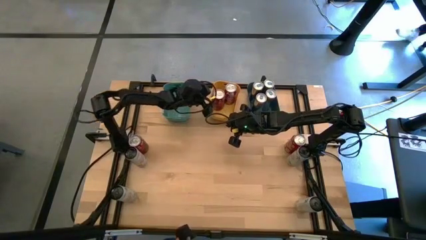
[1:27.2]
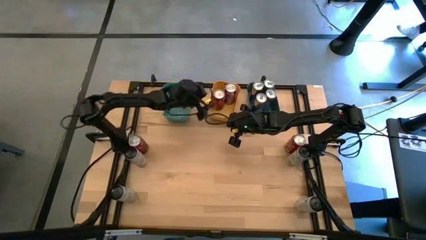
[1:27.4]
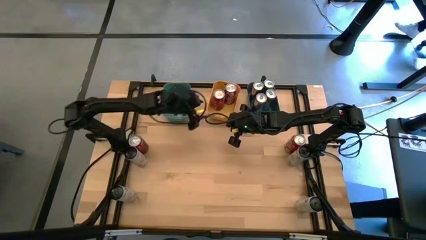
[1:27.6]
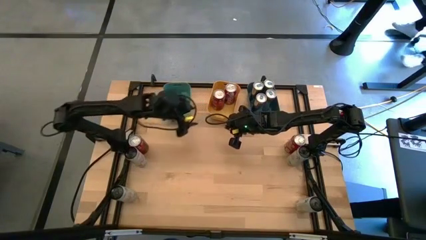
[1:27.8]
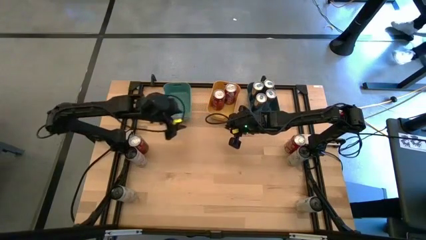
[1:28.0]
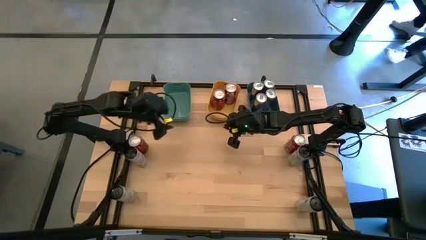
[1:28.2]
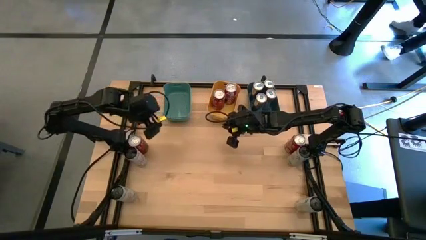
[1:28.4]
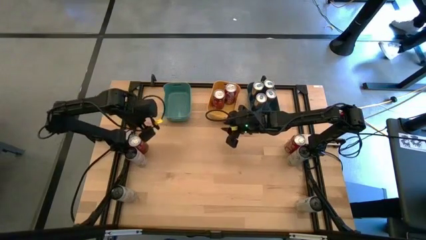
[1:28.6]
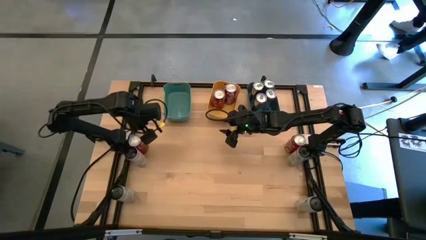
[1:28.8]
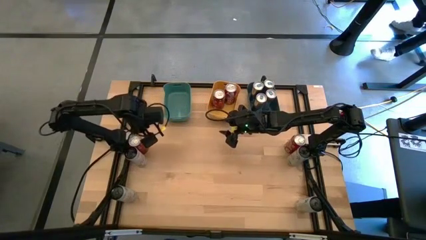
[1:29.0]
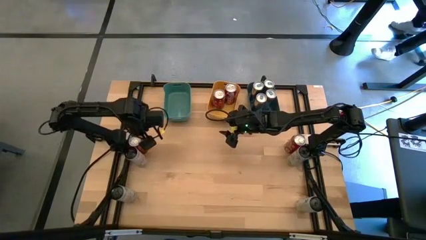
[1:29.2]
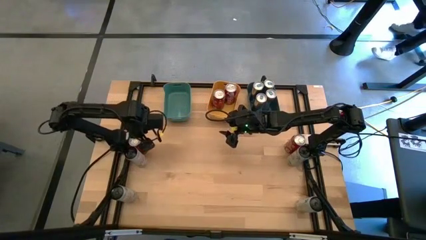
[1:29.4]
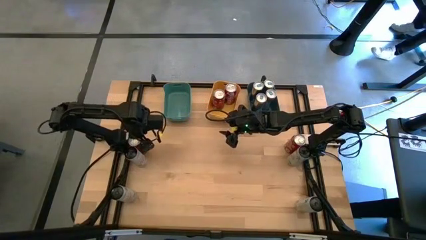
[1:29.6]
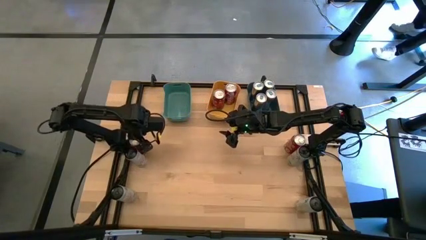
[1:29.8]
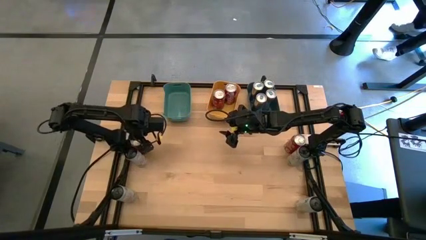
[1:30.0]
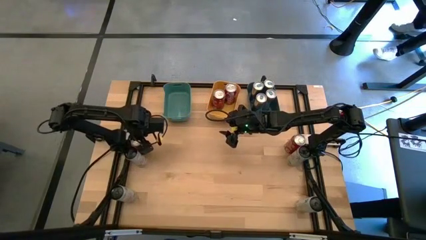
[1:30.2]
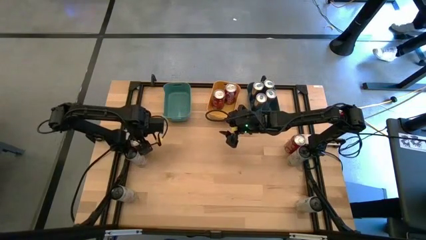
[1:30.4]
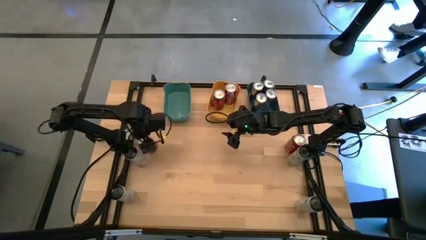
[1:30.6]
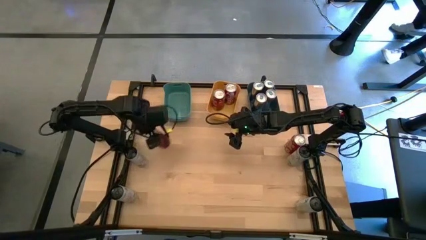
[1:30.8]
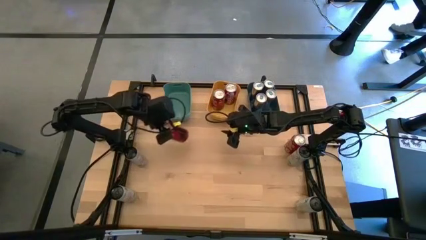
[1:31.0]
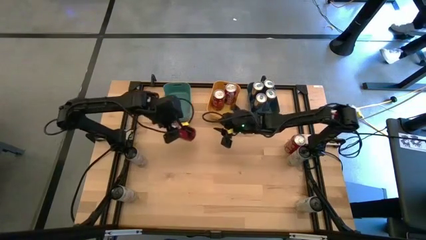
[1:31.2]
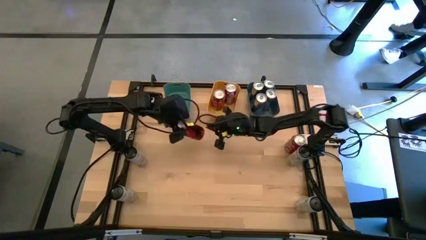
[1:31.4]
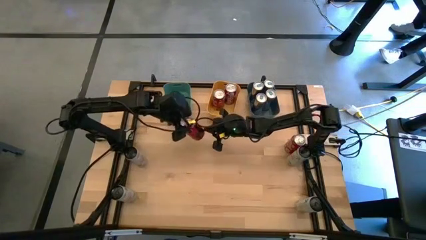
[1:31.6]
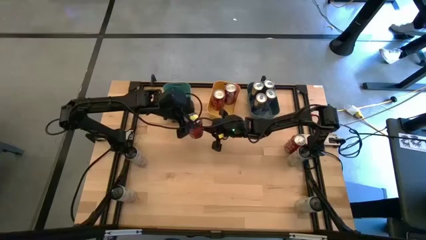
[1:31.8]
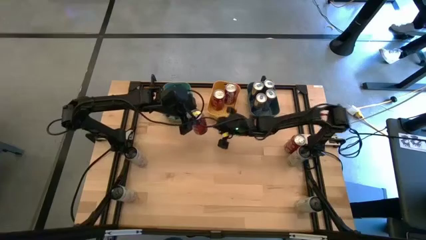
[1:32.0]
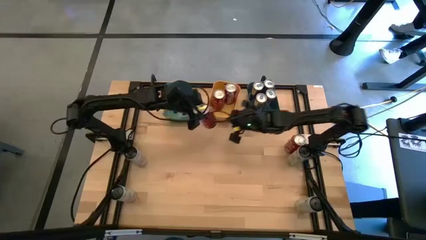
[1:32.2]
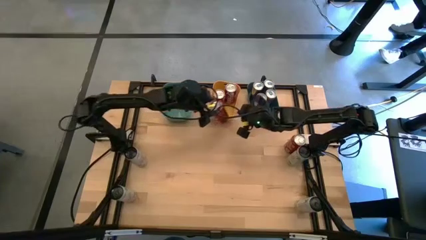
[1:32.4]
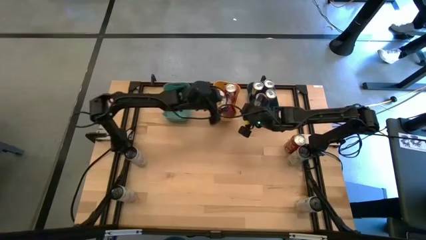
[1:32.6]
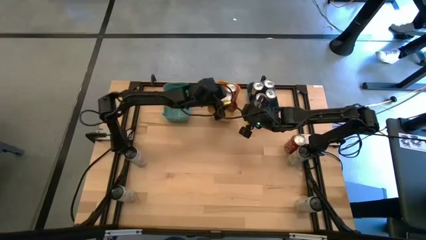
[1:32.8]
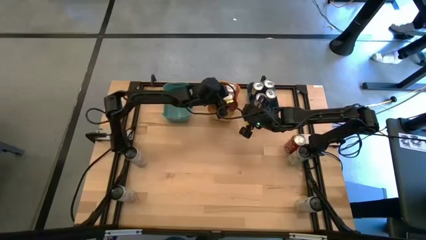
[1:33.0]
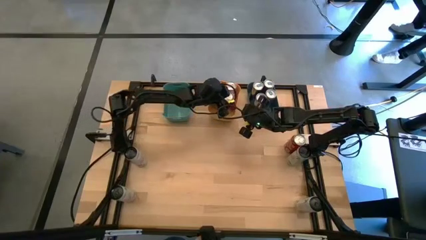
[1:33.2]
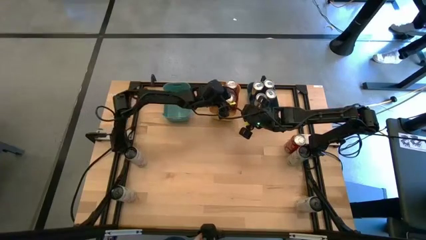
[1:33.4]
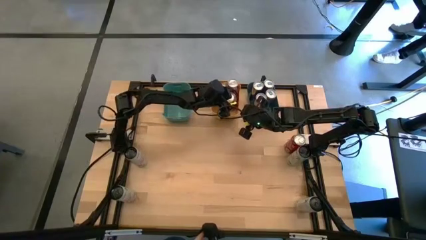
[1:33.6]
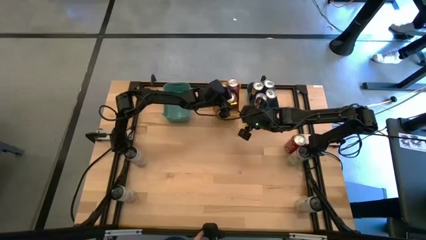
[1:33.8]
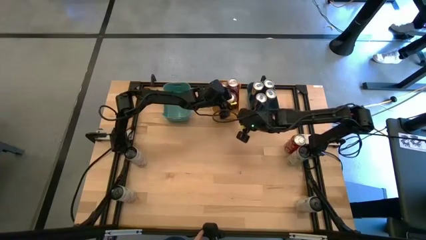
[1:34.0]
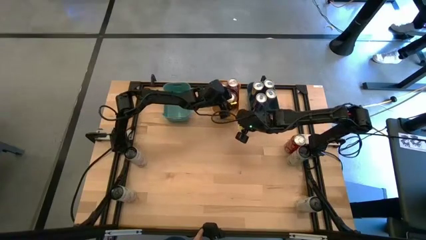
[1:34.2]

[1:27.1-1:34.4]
Task: Sort soda cans
Put the left red soda can into the yellow bin

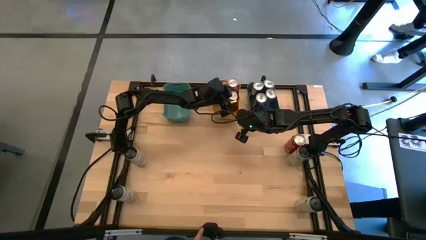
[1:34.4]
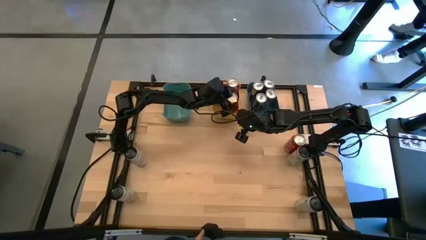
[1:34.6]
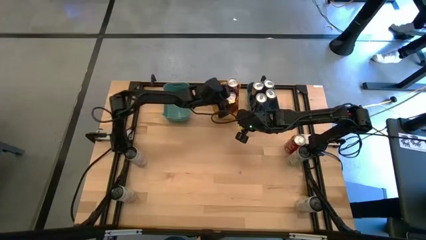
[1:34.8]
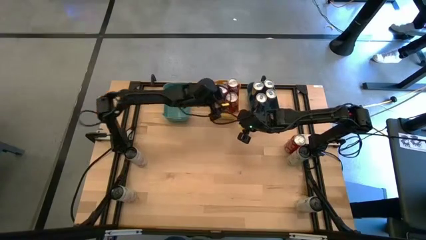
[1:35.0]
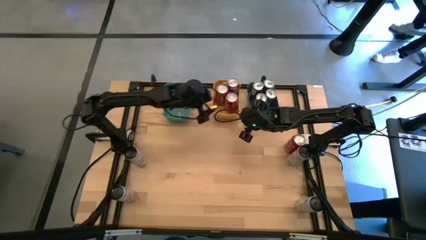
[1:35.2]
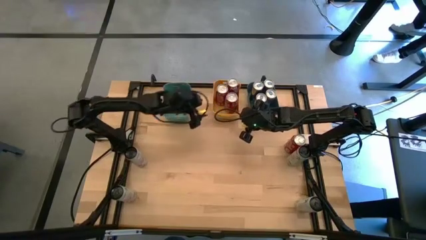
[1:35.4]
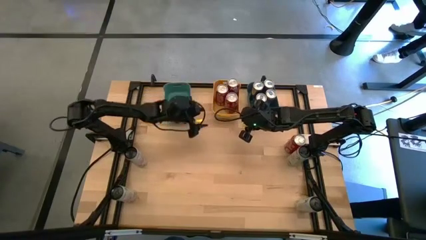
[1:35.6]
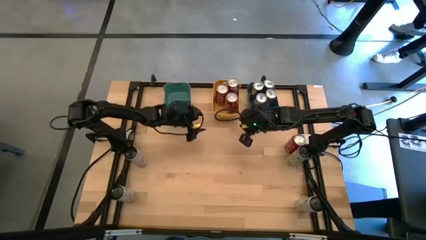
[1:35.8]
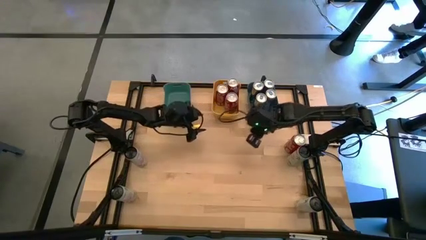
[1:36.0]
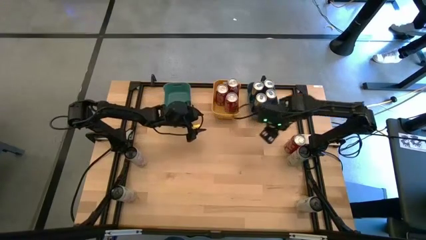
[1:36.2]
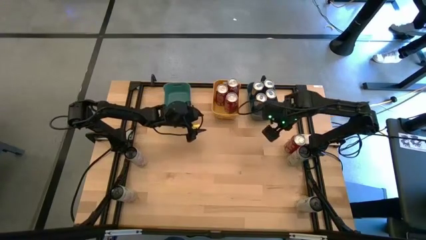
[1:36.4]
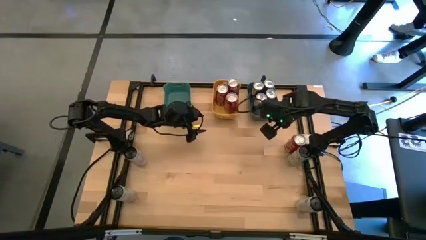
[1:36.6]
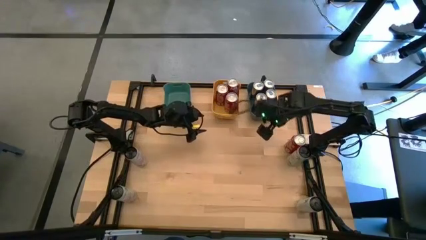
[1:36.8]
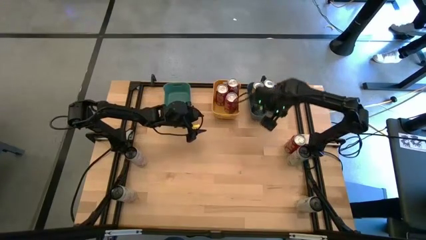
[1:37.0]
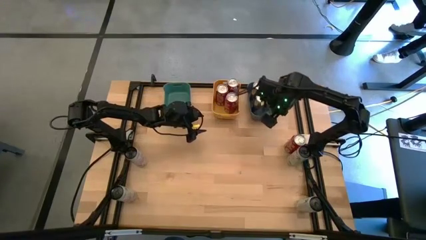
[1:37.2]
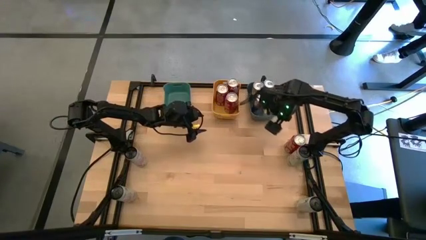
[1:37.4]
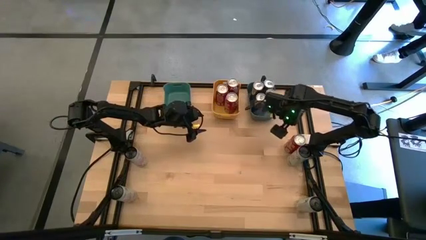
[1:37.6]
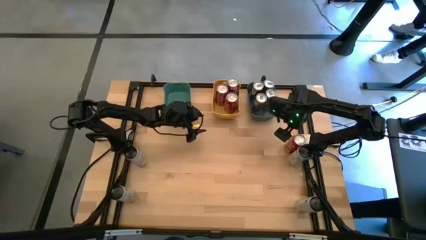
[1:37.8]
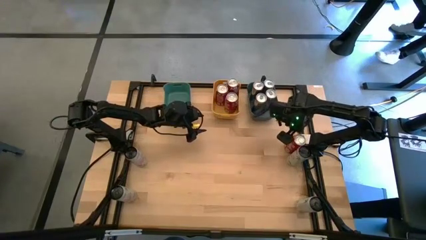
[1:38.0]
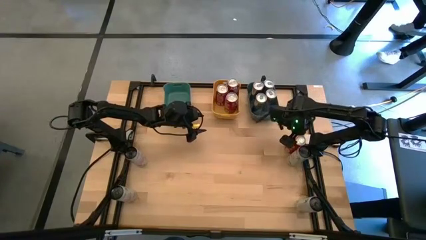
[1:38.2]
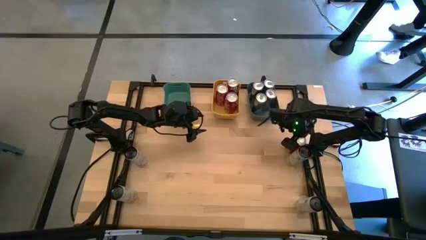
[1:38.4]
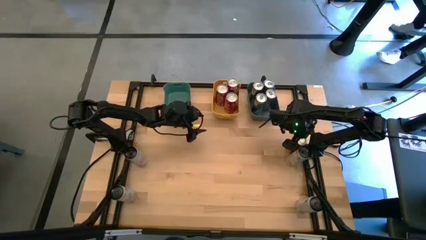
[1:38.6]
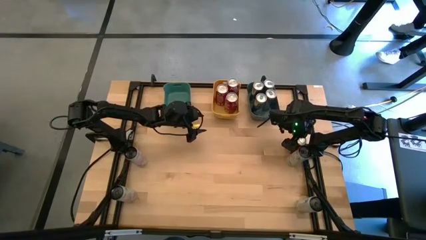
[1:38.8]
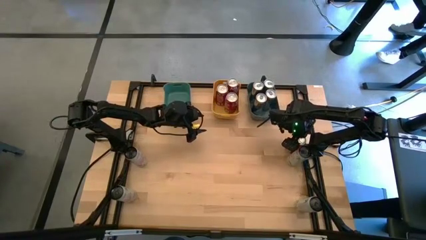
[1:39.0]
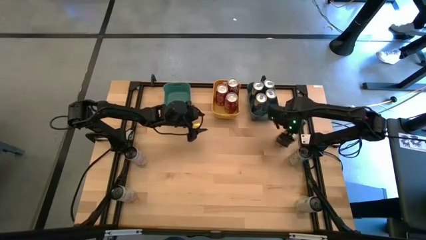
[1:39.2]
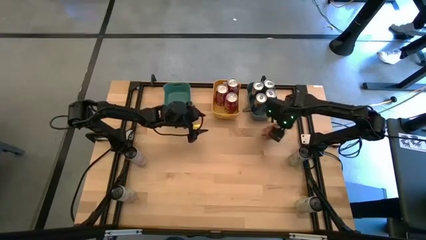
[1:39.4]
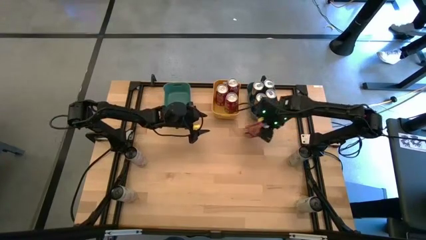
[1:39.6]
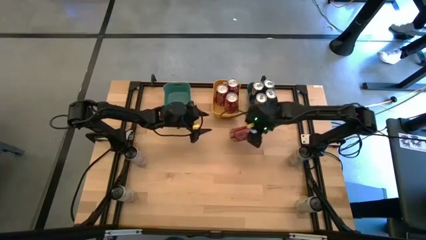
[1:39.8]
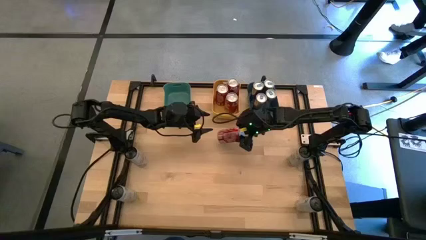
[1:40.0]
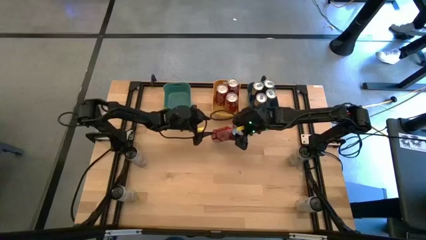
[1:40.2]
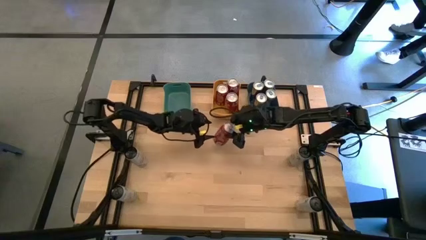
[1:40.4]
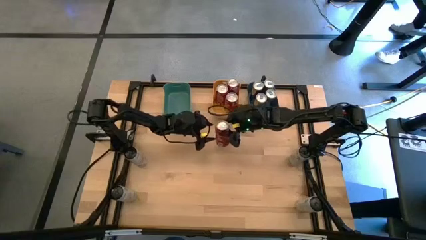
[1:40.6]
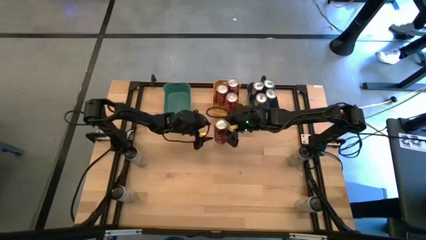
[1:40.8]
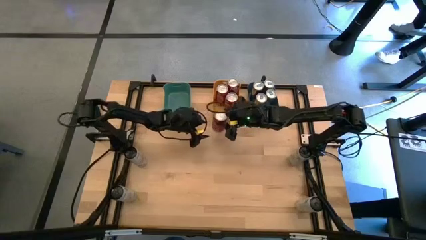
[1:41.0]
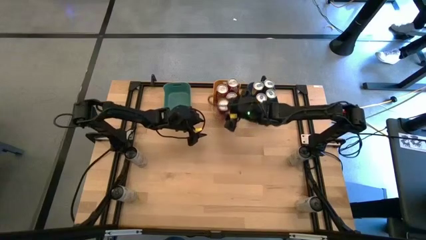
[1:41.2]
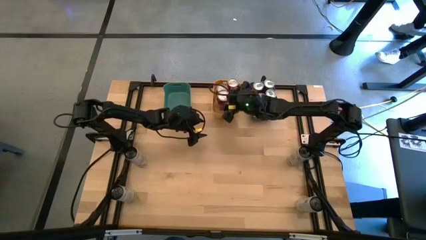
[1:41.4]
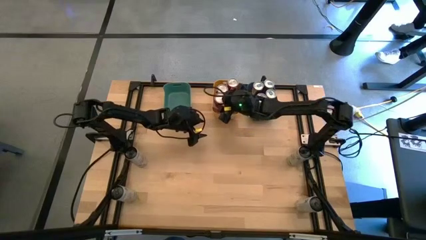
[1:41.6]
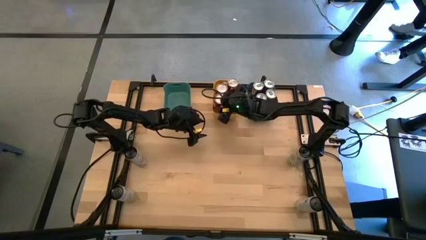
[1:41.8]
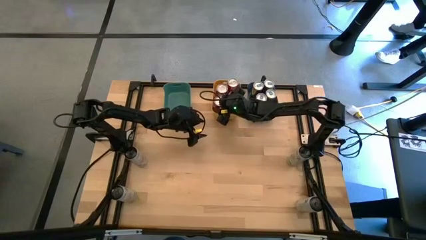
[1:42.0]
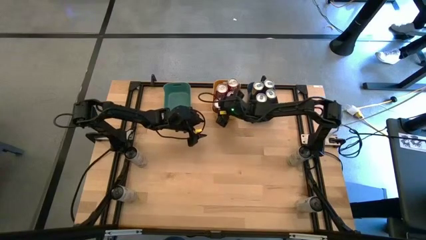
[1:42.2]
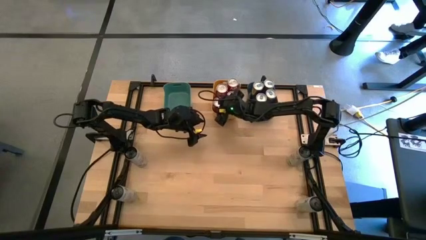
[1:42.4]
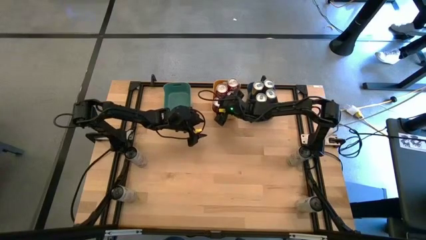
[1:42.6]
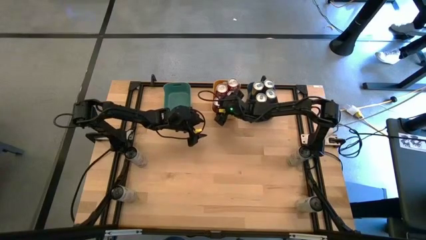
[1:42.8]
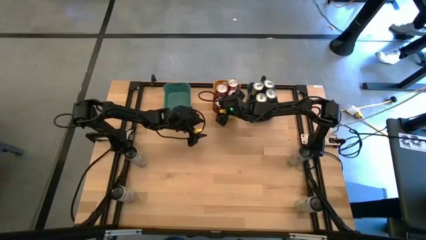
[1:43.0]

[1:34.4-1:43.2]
Put the red soda can into the yellow bin
